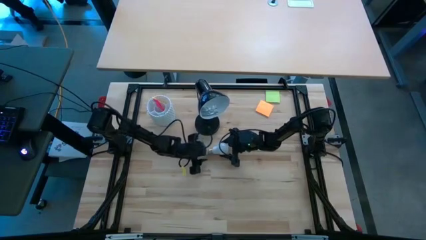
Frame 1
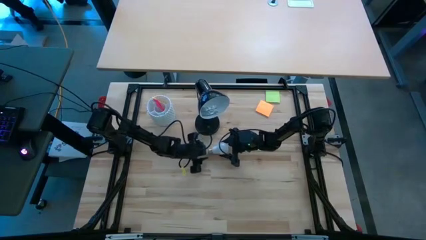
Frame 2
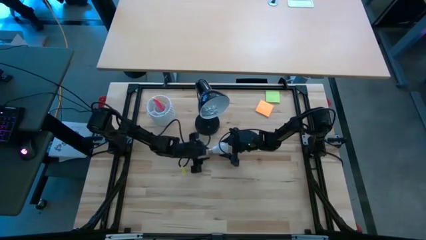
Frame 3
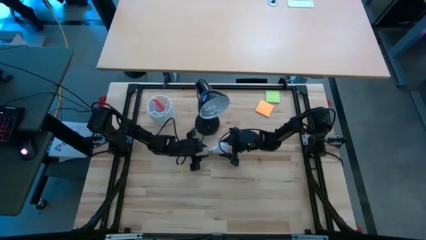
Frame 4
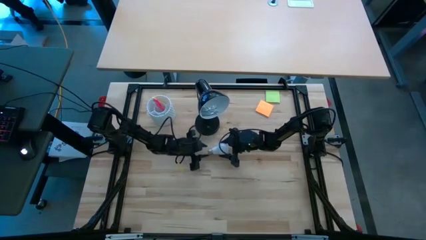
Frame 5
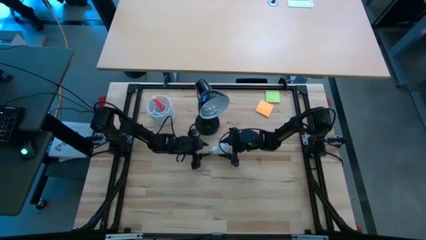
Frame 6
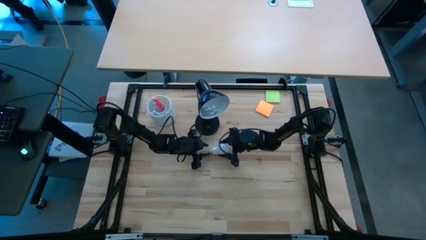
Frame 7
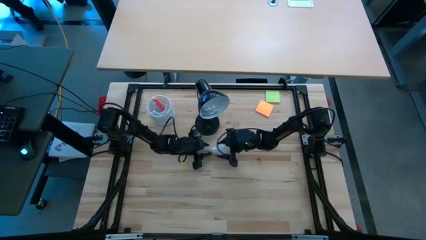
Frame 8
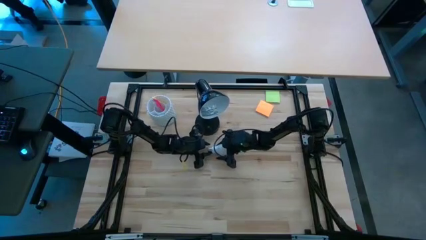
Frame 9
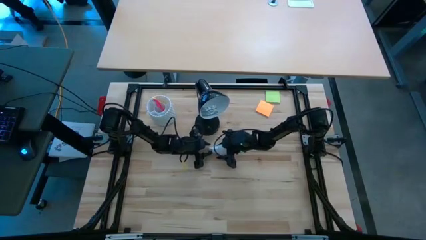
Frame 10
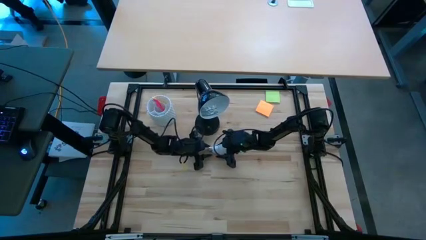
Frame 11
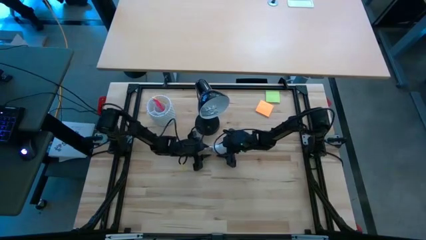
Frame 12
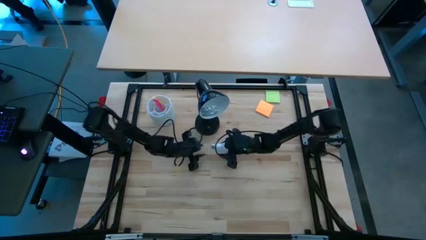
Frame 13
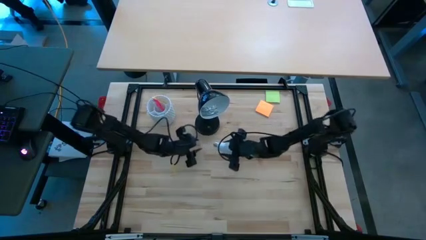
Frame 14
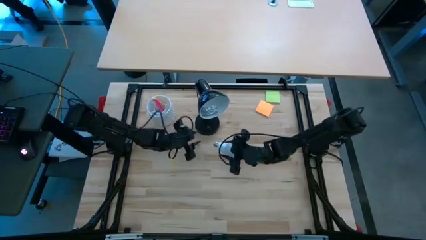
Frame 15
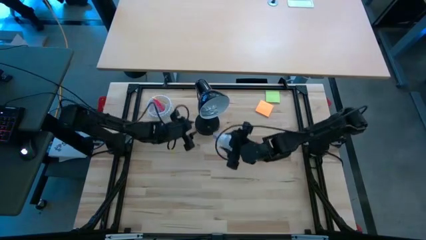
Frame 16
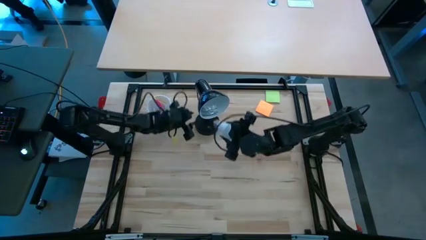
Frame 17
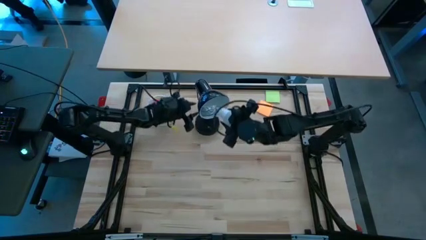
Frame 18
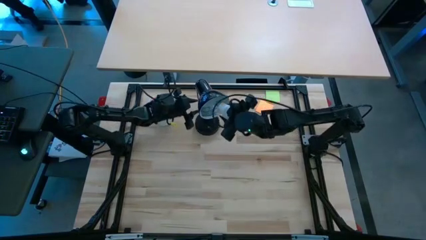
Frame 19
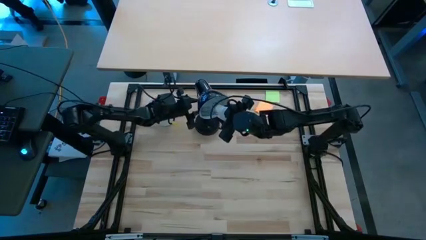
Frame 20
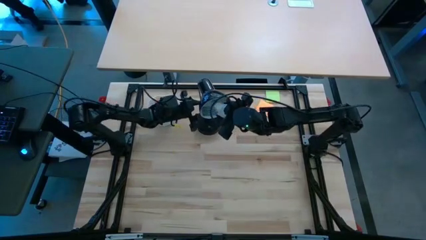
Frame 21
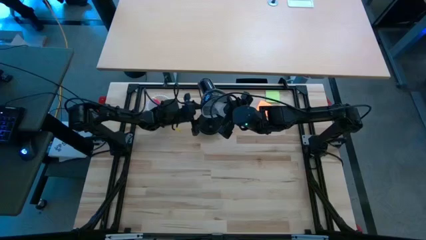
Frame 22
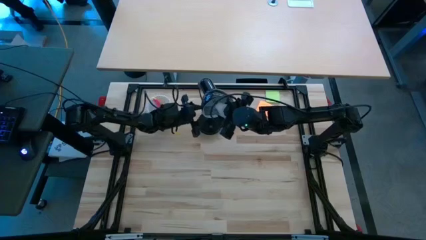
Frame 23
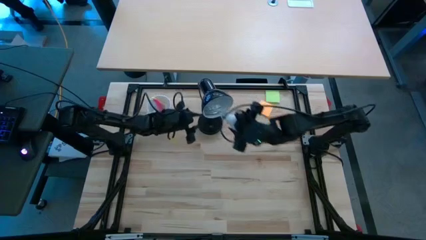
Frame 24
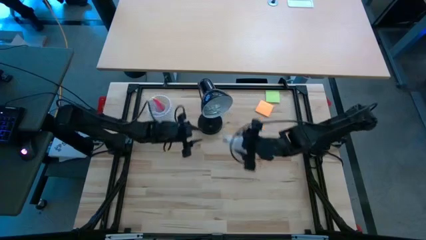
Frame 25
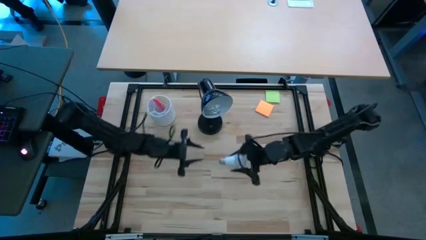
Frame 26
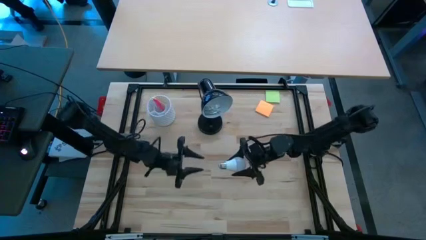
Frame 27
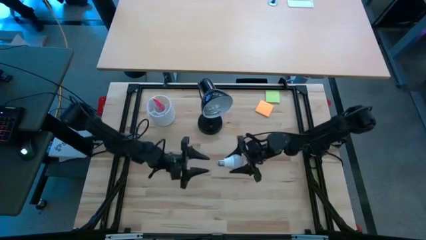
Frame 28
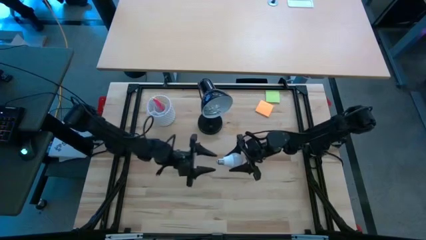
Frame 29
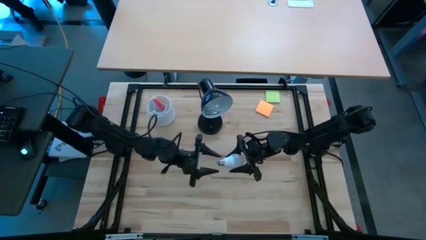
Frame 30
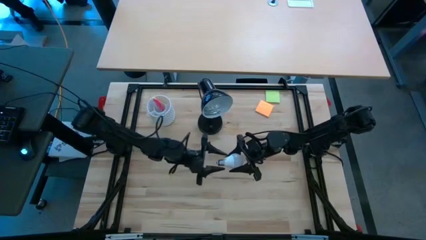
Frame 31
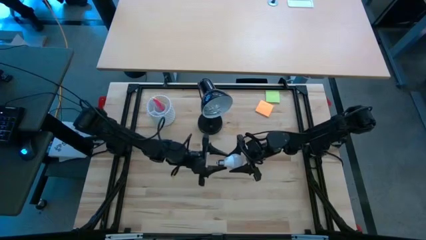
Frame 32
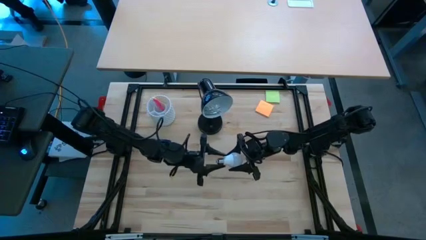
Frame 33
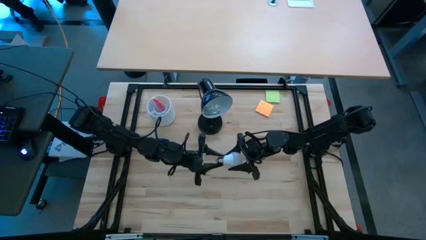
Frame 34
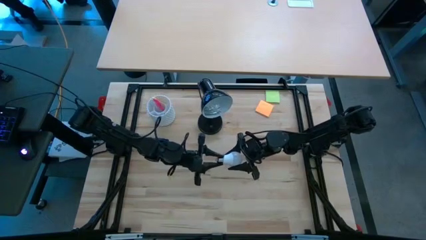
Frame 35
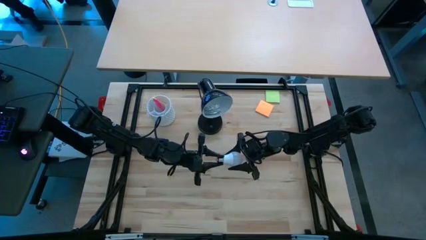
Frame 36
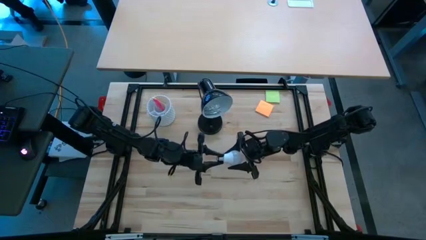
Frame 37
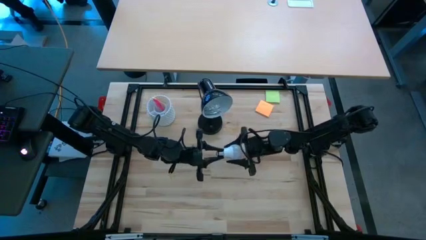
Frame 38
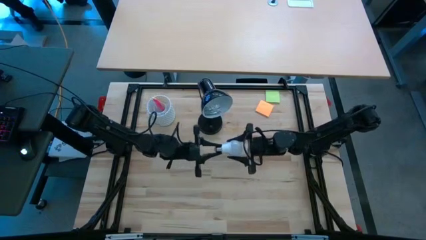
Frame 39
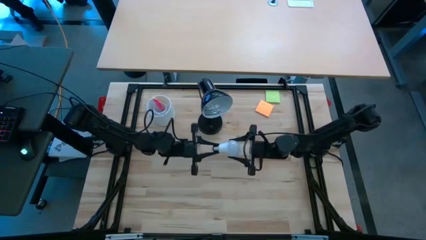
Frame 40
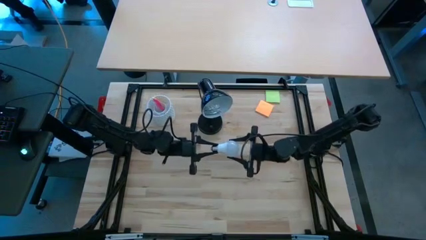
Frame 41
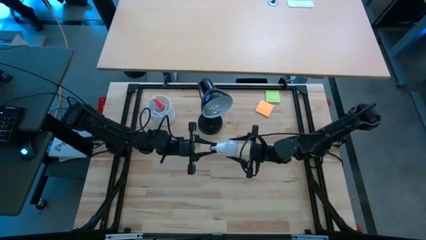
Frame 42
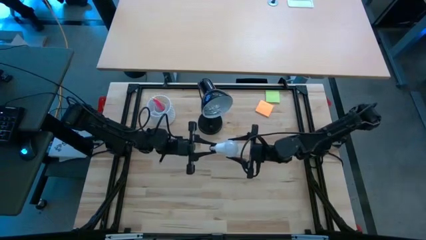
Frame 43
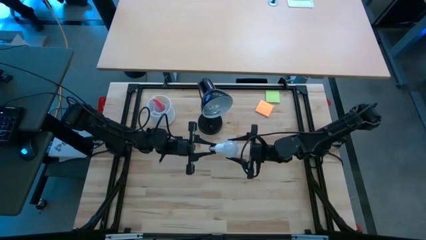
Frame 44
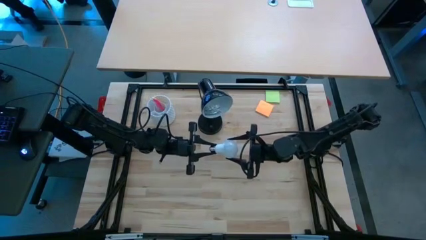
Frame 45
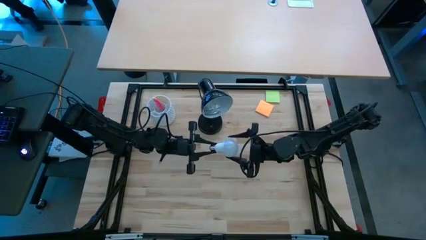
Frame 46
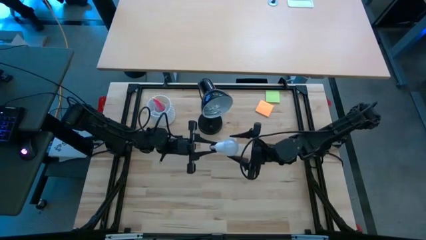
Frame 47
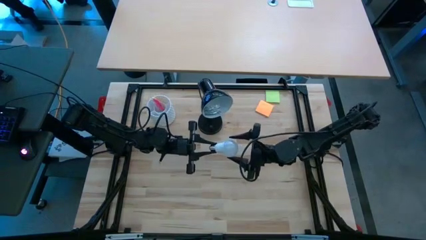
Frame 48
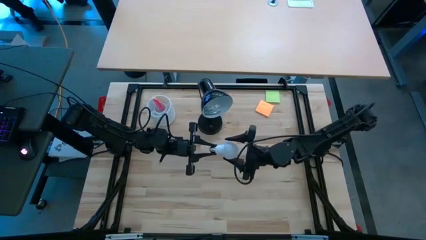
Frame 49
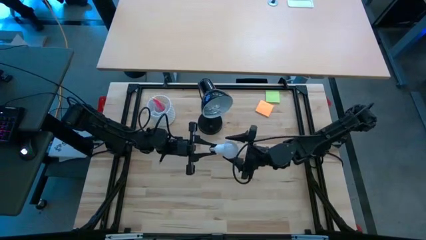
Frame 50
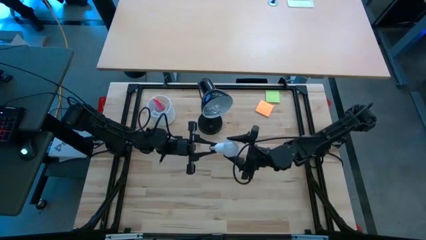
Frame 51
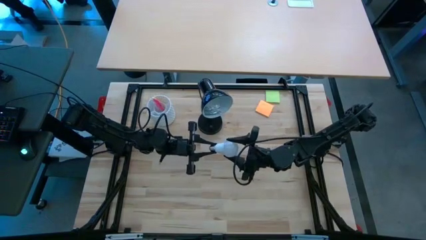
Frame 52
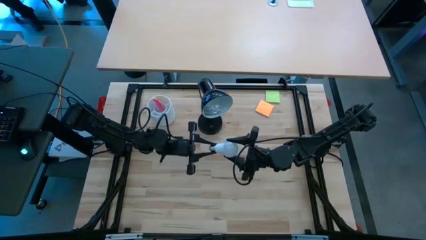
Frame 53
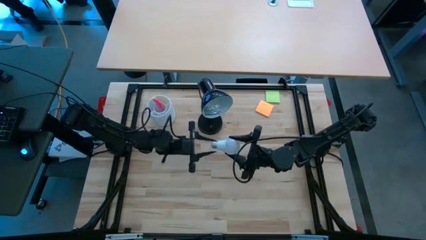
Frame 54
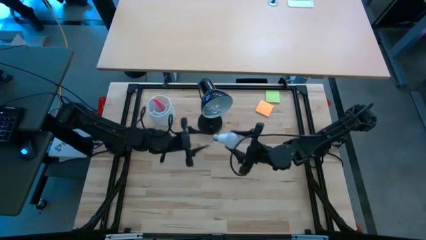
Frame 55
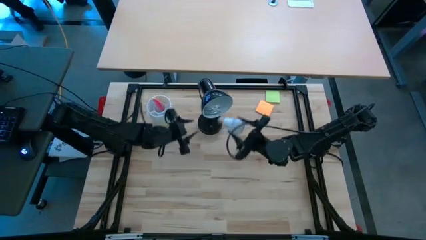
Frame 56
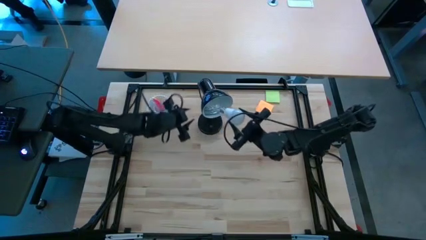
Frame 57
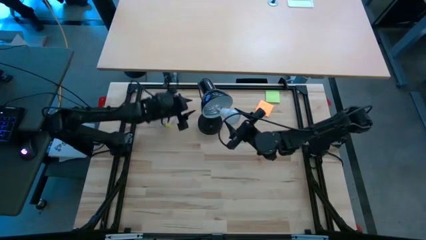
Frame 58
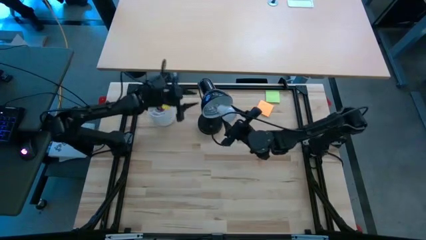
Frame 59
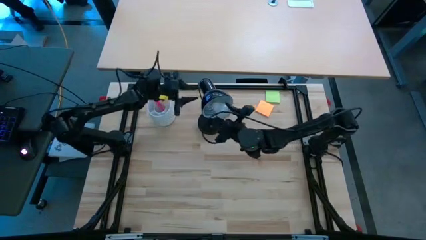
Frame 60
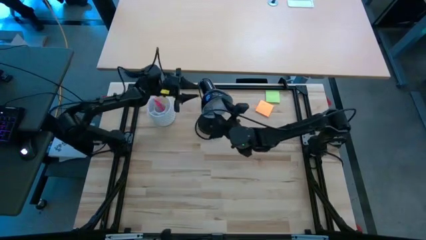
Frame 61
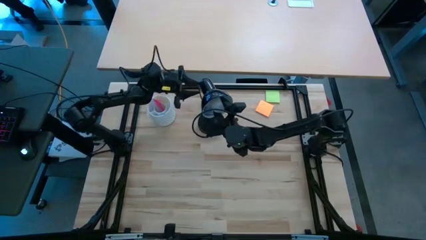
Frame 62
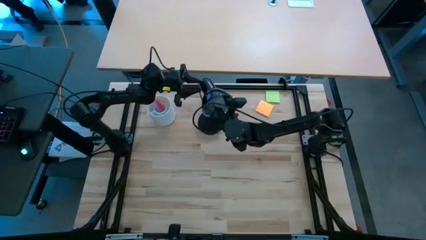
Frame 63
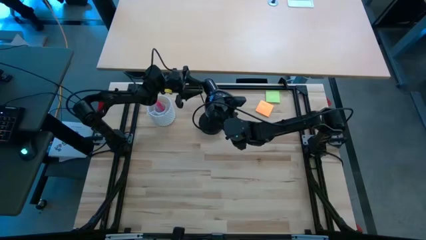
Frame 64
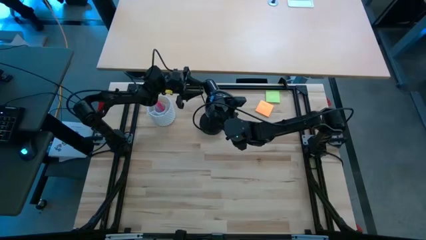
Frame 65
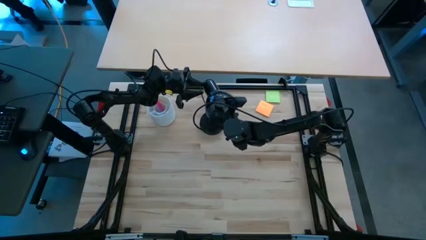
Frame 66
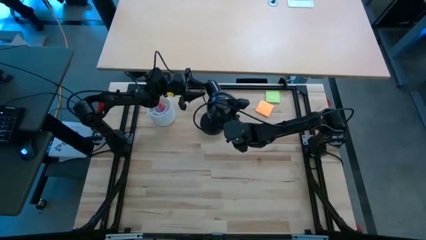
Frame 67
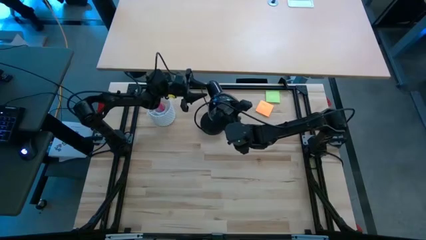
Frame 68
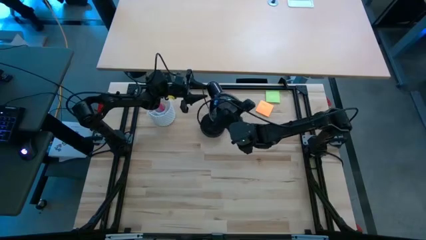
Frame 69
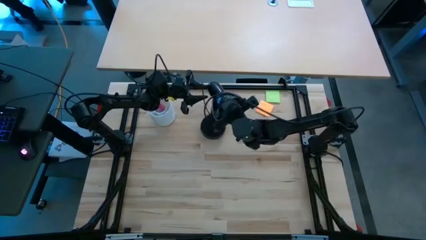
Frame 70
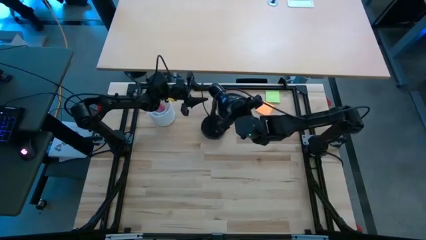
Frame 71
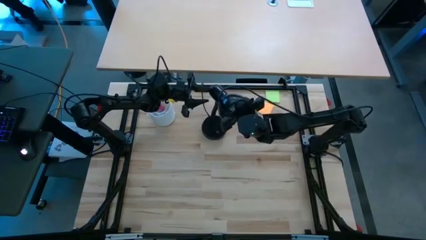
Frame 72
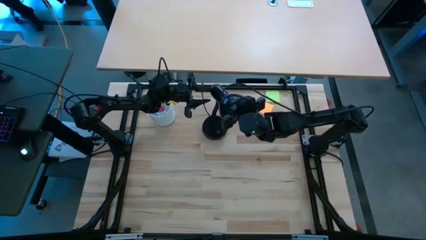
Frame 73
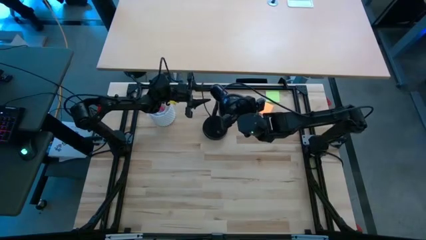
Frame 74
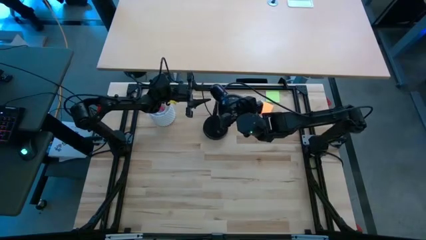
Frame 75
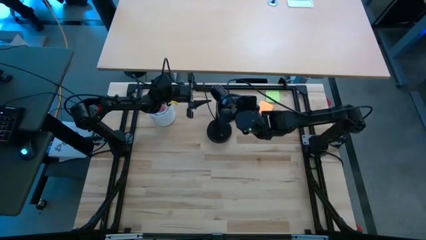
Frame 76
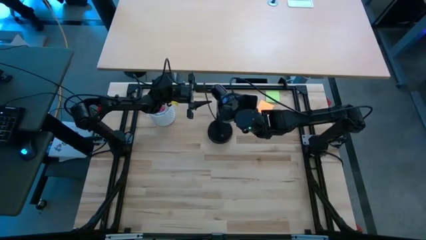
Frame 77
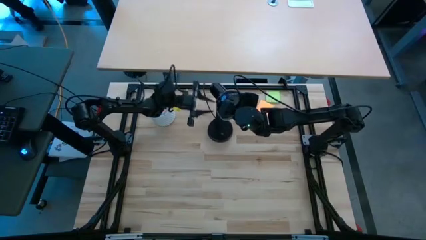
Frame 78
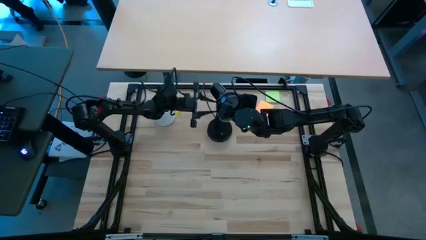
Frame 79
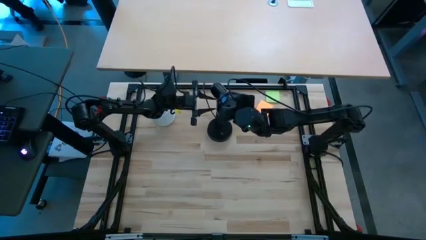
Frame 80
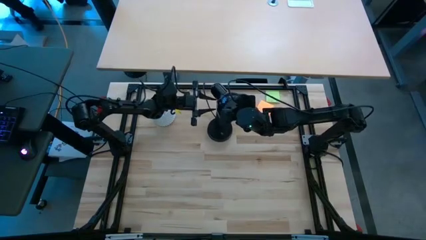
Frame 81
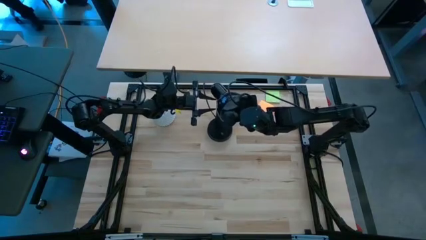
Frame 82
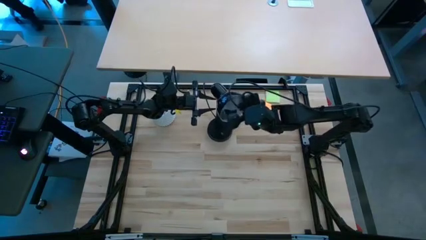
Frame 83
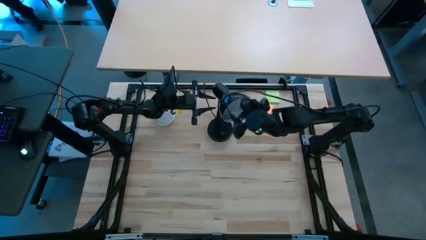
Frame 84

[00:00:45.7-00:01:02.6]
Task: Screw lightbulb
Insert the light bulb into the desk lamp
